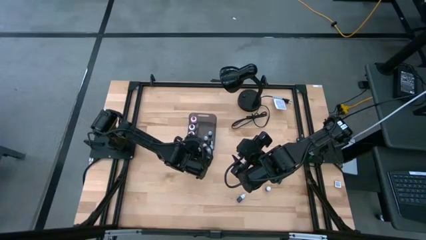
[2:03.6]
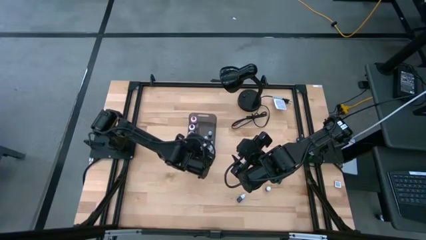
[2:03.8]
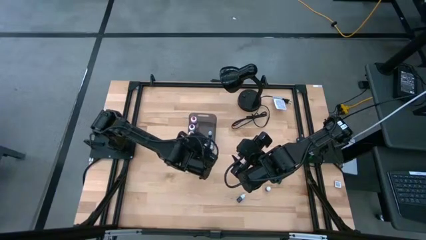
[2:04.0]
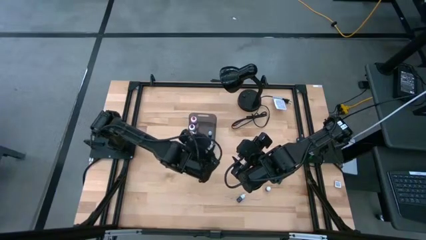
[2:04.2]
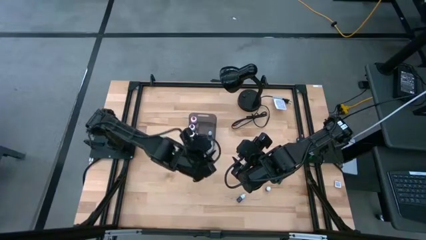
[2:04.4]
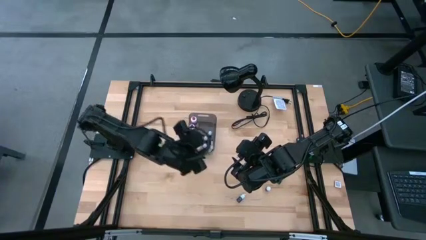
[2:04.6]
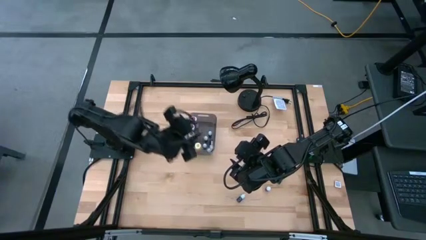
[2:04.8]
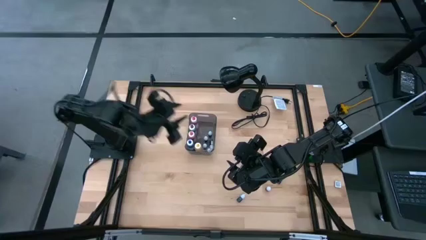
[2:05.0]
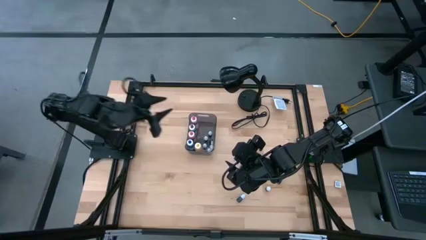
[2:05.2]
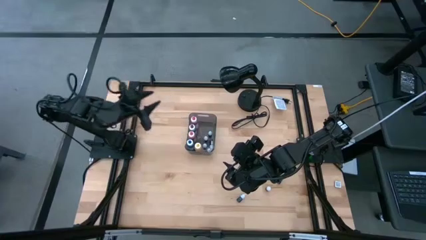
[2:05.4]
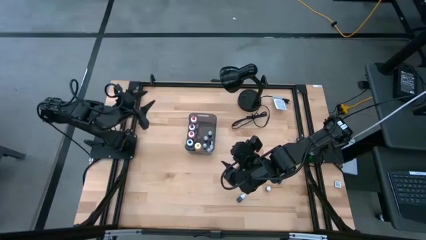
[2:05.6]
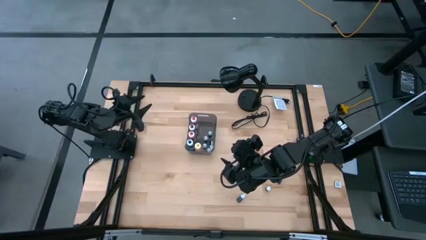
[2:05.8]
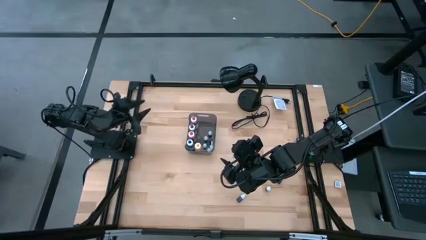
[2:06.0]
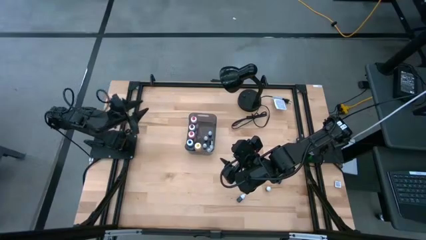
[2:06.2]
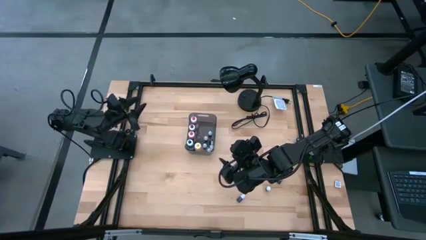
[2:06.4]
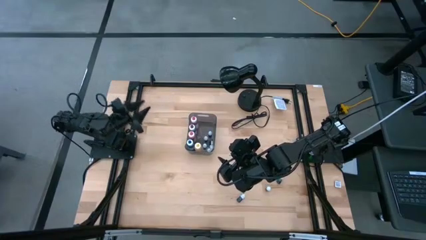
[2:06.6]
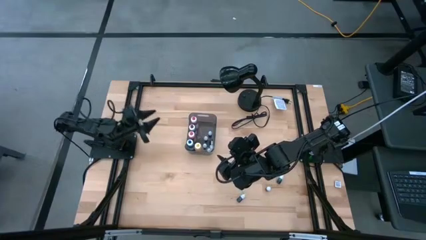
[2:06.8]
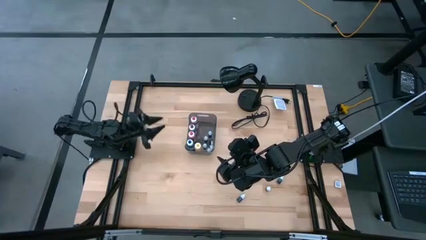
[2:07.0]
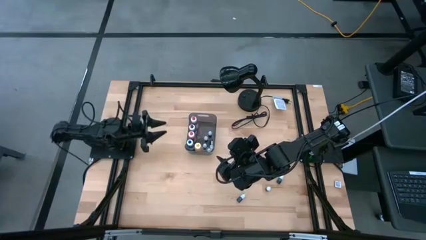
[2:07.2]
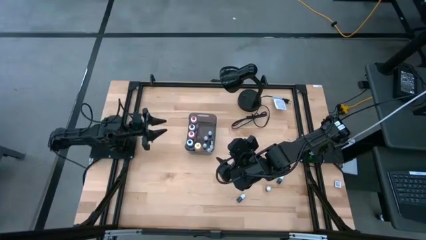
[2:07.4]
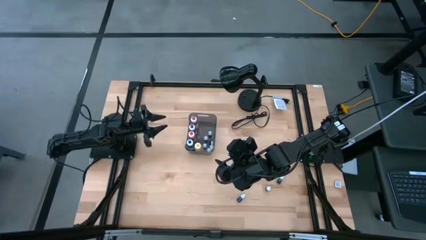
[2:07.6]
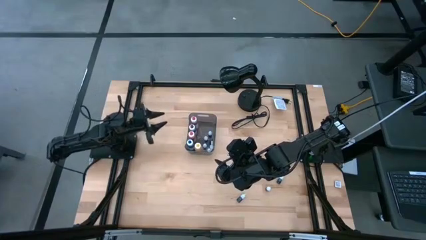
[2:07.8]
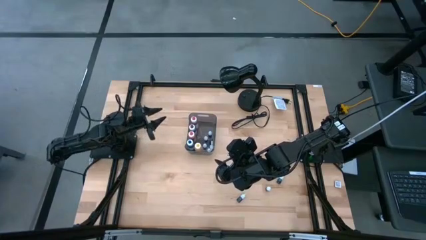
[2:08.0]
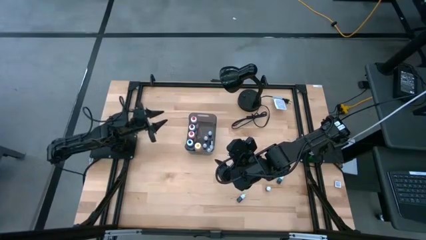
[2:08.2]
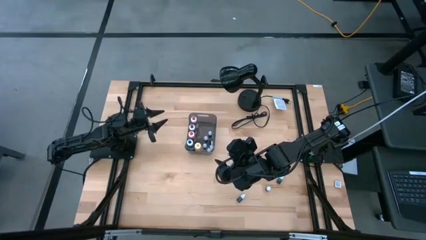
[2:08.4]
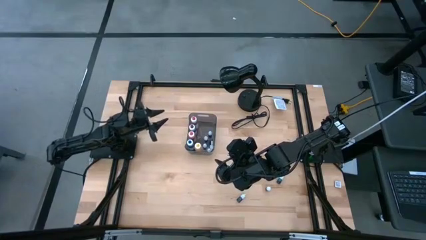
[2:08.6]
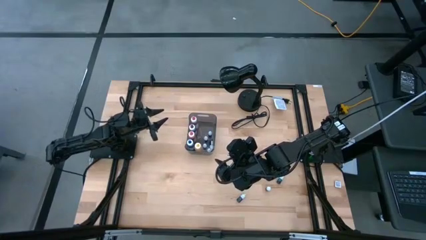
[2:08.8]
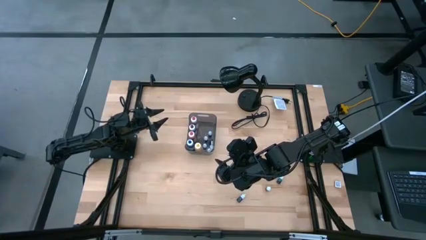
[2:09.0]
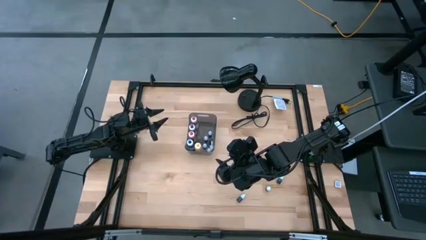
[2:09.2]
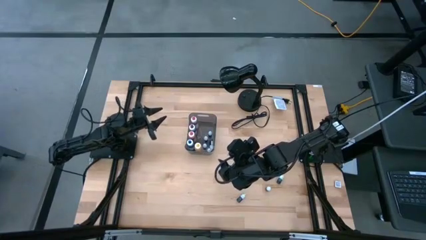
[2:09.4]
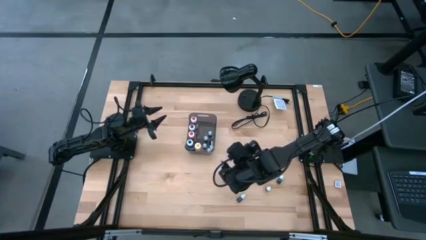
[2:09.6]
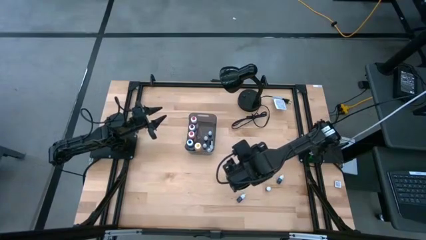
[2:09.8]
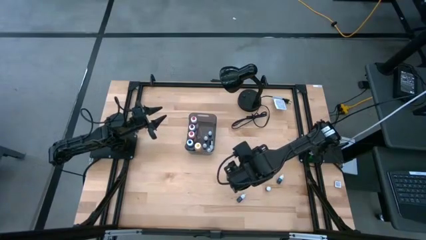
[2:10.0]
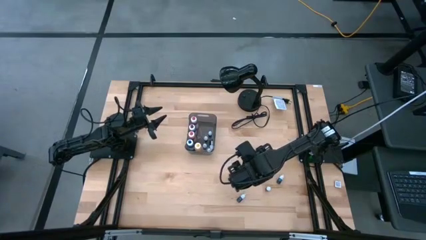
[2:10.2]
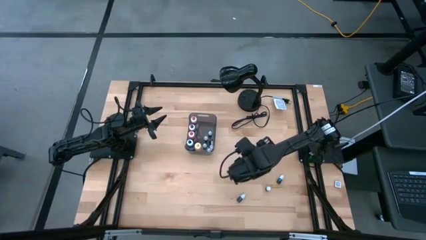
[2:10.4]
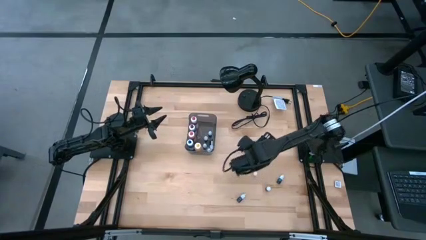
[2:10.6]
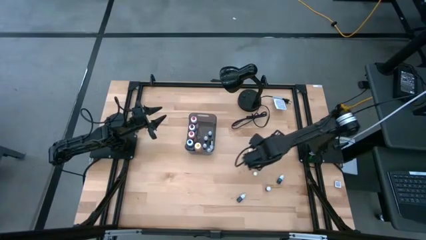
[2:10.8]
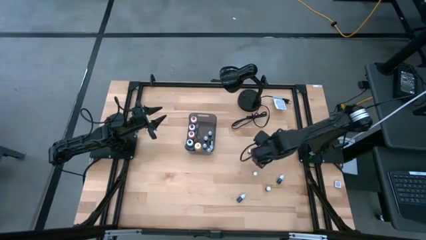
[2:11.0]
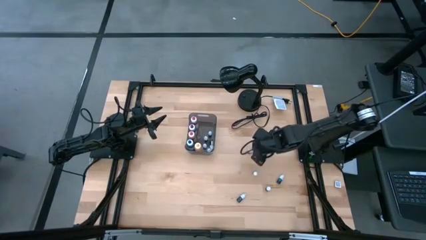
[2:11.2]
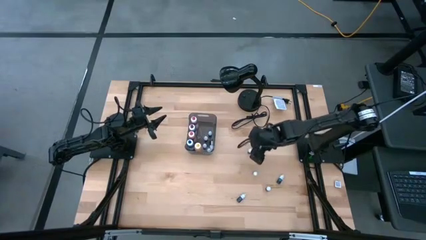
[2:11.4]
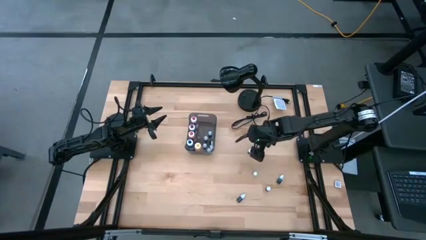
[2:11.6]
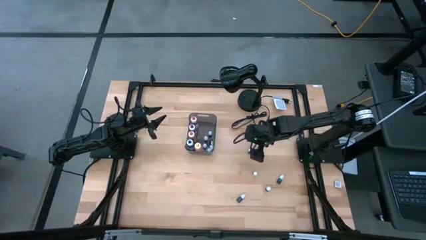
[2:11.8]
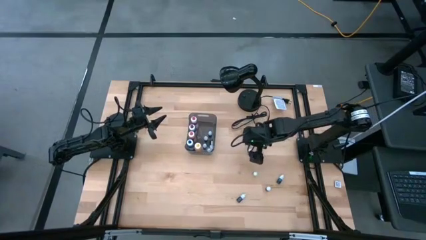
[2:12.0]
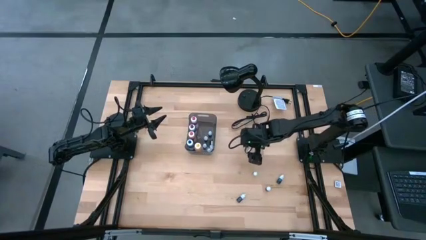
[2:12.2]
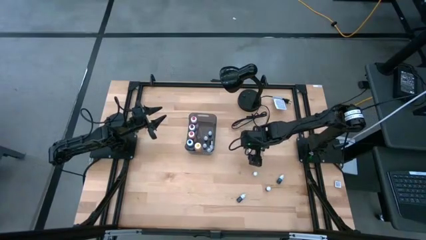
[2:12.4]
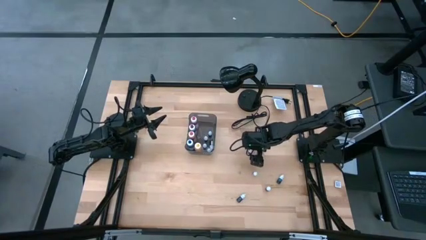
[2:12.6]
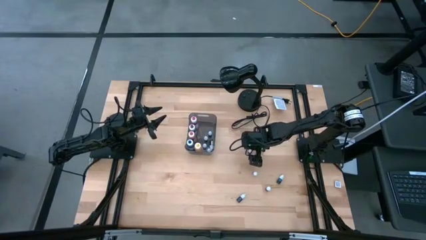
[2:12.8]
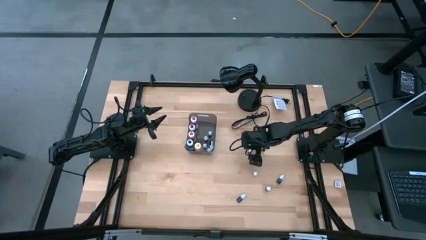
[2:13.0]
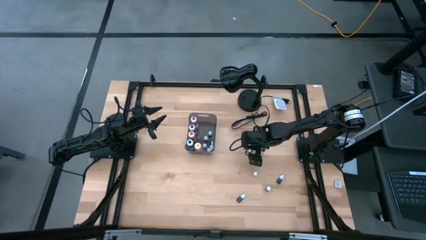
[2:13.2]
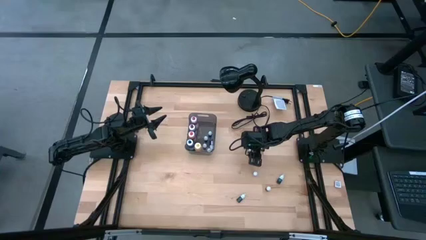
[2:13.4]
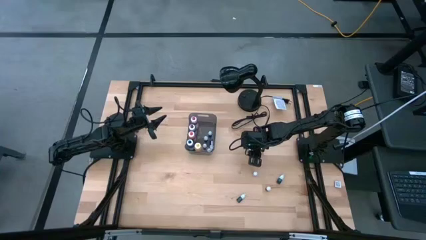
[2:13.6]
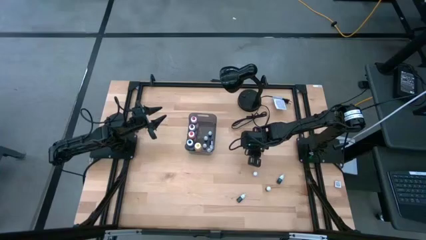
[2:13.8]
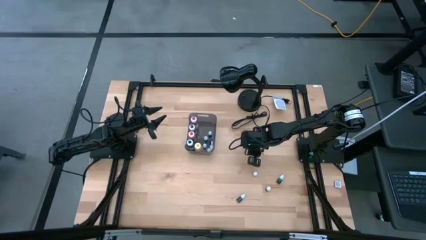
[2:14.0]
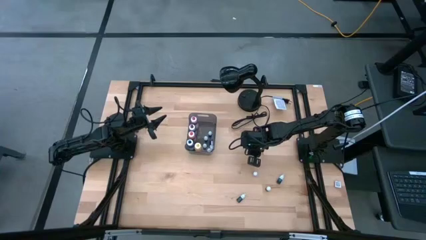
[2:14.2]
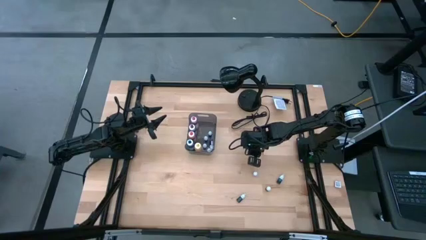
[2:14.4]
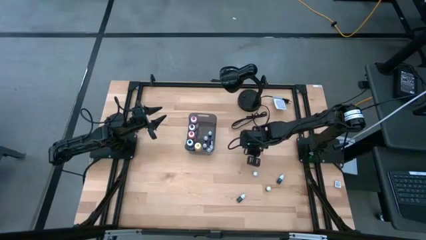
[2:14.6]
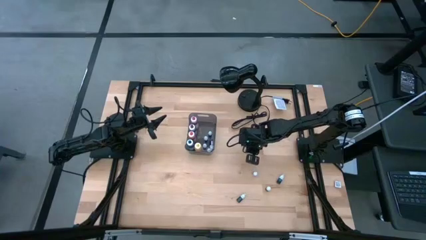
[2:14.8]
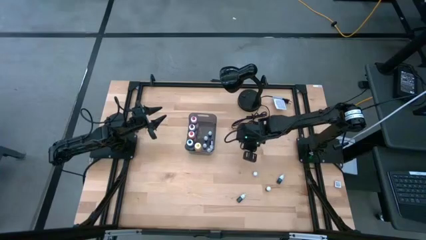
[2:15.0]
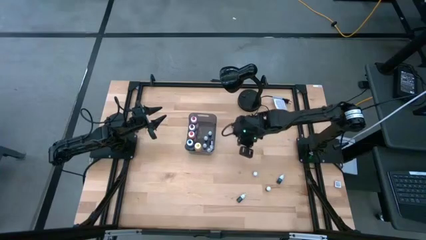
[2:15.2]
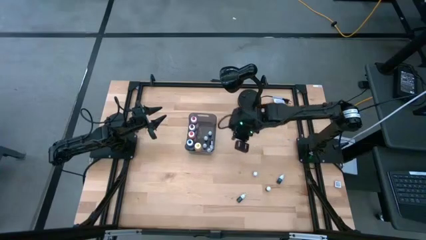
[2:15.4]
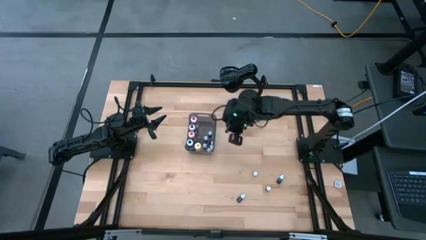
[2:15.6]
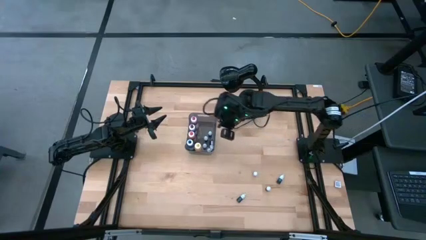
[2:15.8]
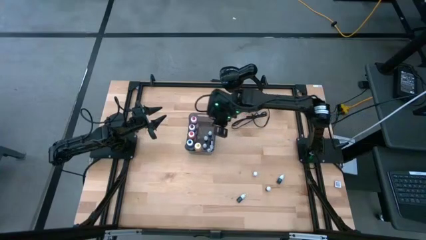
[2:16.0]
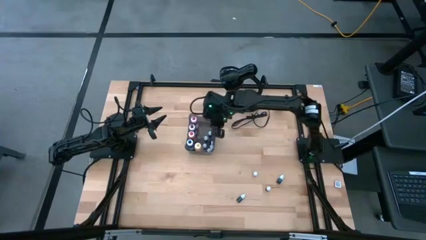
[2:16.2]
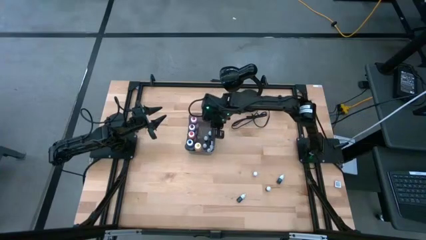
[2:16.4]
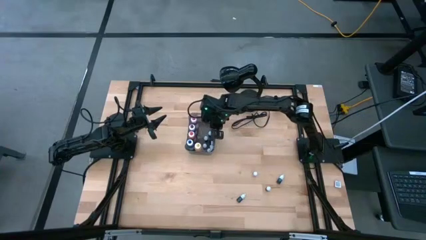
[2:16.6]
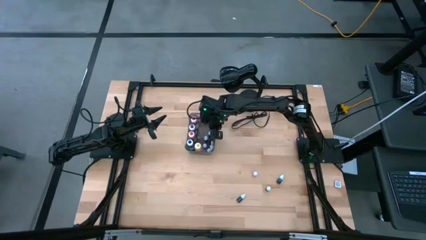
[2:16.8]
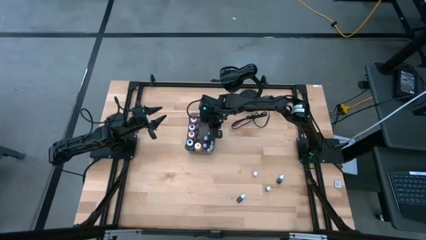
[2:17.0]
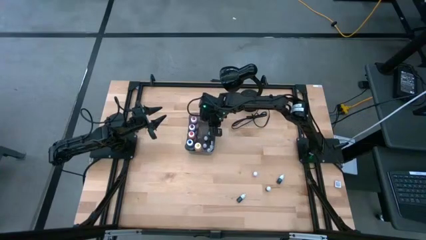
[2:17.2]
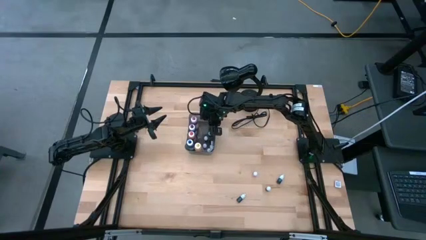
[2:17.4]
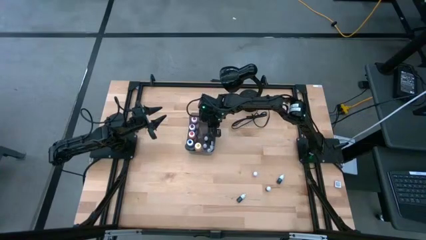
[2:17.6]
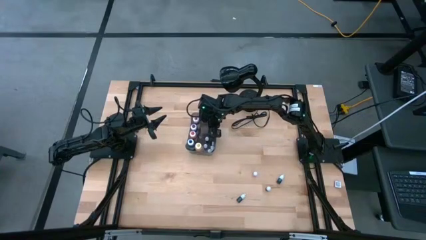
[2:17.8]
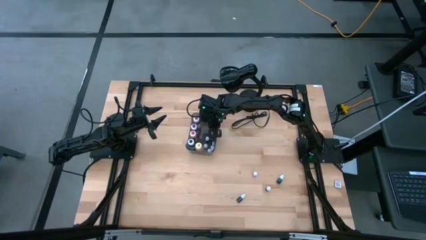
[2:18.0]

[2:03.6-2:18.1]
Task: Pick & Place food coloring
Put the top small black food coloring bottle into the gray transparent bin
